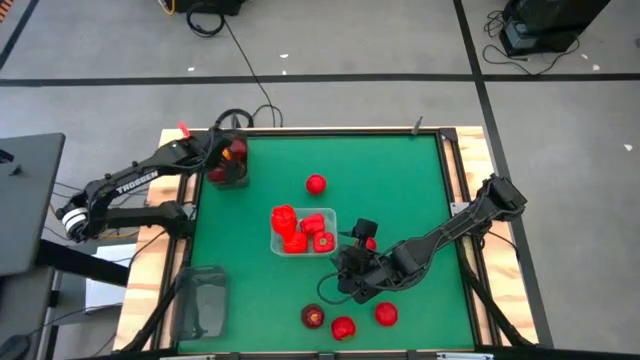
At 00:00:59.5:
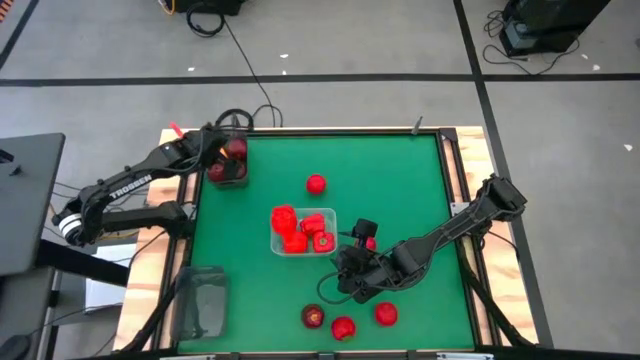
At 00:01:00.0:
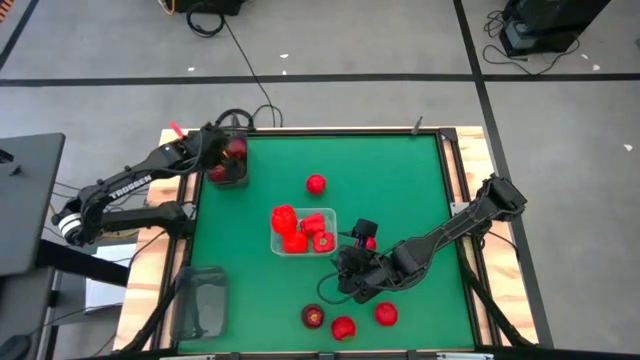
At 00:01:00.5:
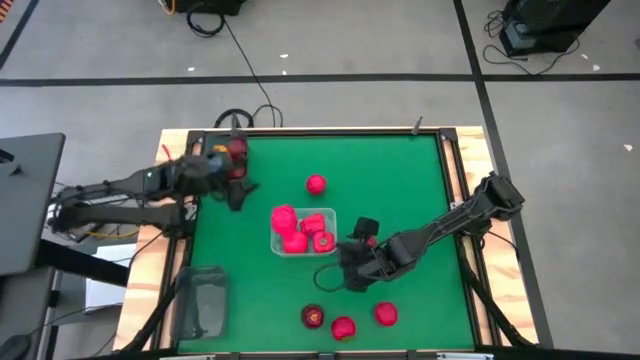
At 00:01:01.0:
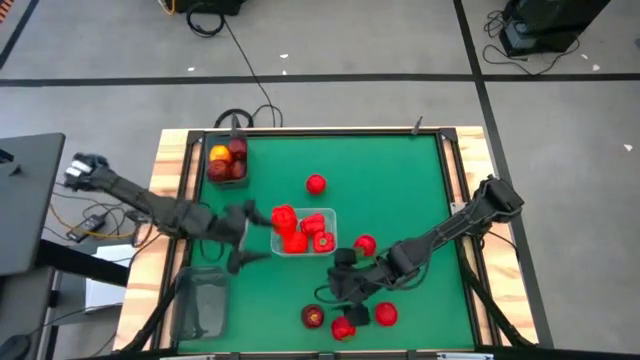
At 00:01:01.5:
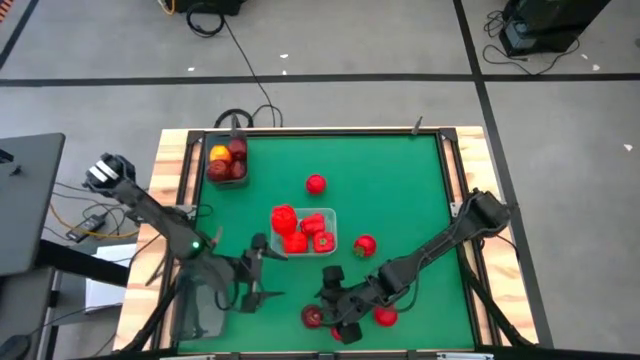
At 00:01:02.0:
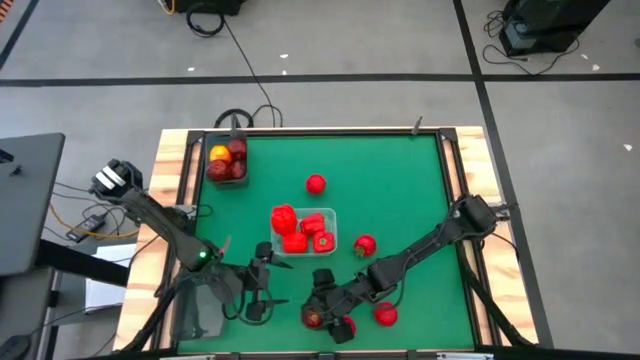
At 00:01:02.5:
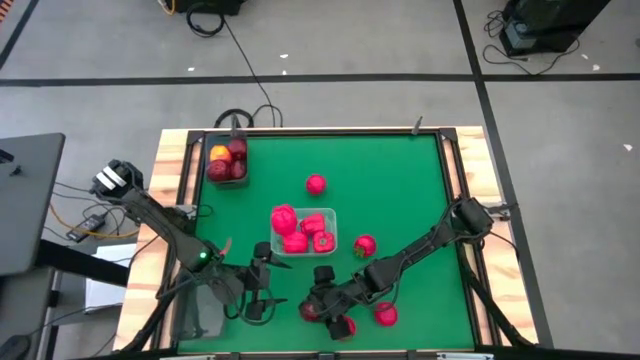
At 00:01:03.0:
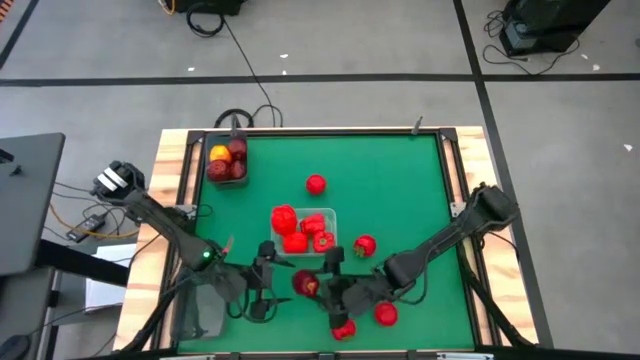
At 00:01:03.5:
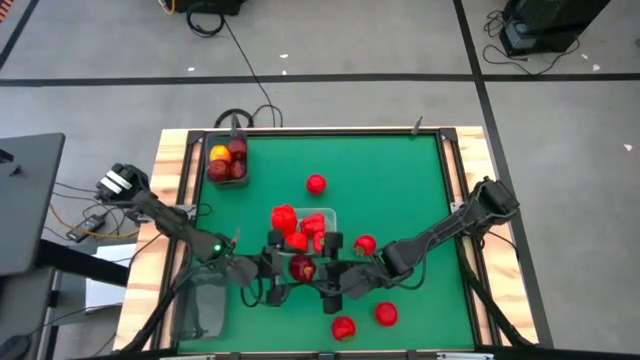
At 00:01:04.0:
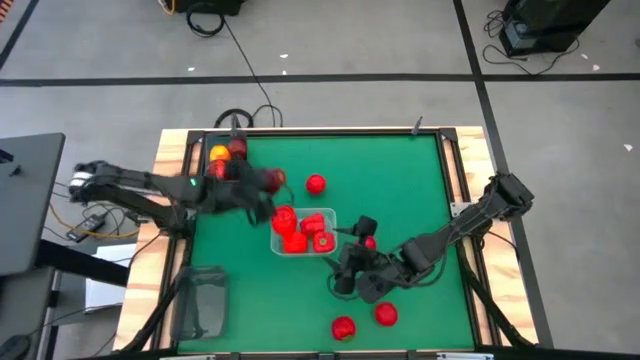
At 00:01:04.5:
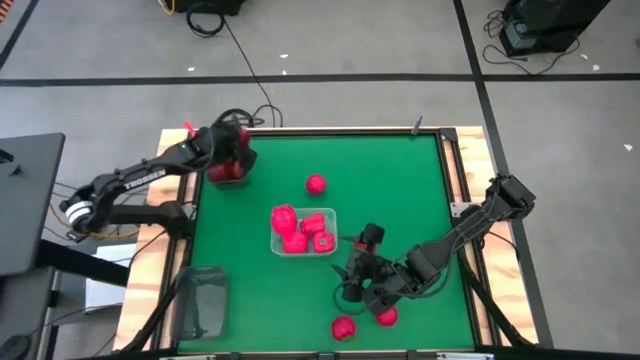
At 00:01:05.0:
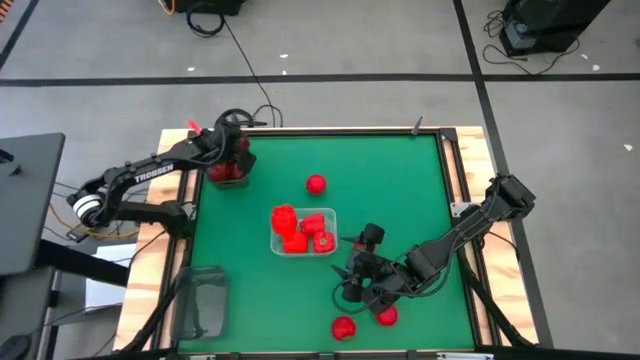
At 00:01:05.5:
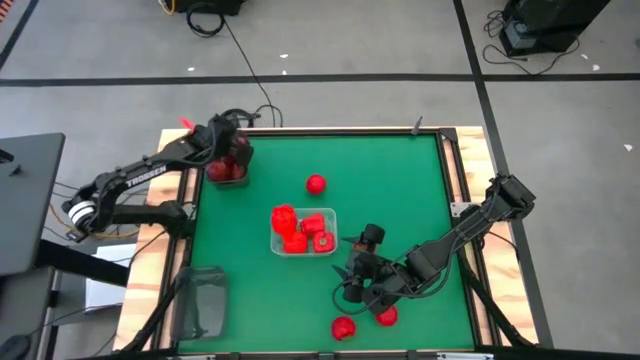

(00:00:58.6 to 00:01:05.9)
Task: Sort produce into baskets
Put the red apple into the top black bin

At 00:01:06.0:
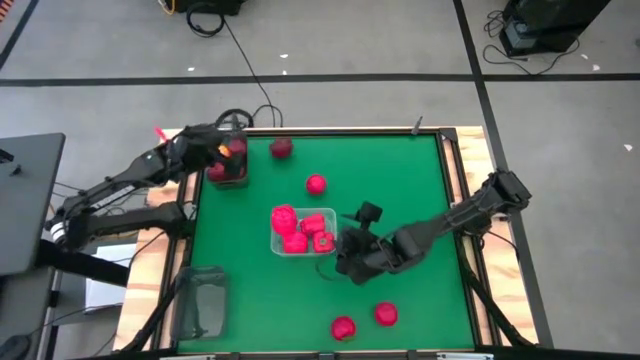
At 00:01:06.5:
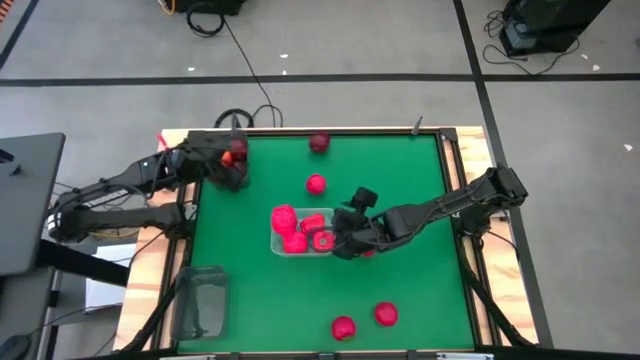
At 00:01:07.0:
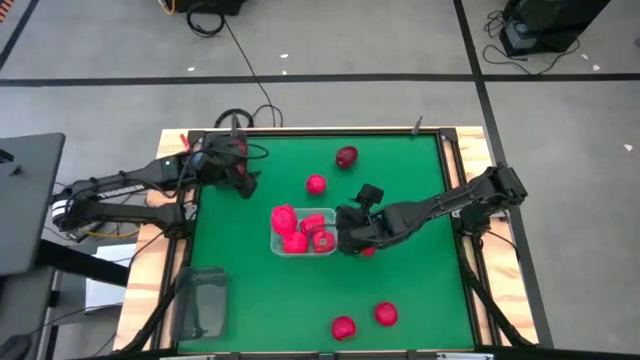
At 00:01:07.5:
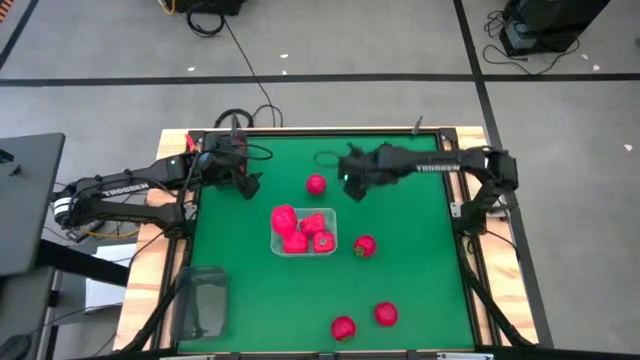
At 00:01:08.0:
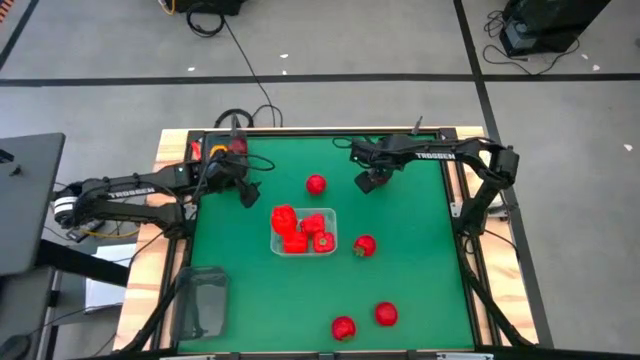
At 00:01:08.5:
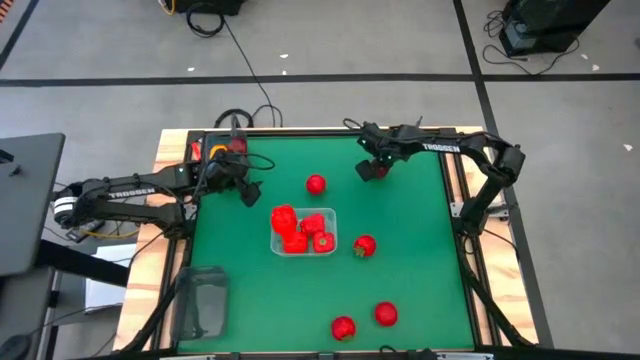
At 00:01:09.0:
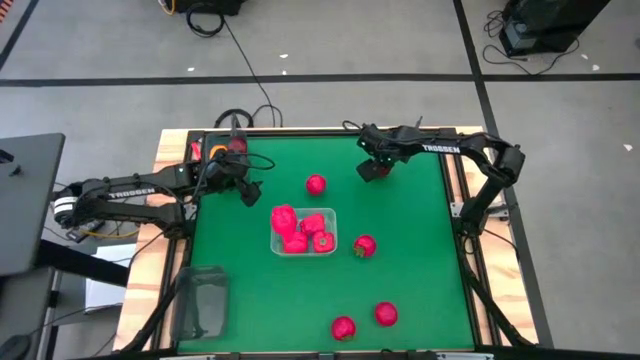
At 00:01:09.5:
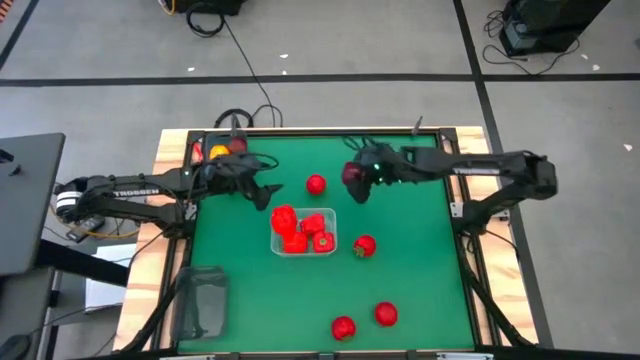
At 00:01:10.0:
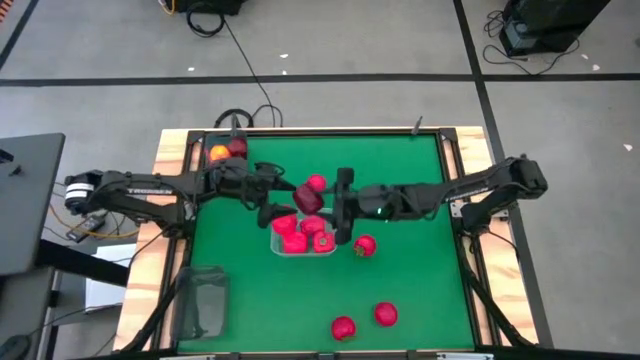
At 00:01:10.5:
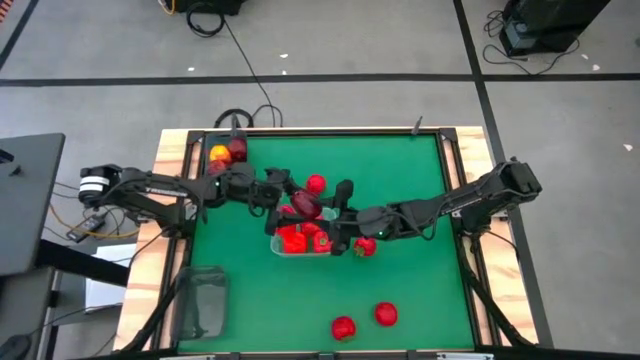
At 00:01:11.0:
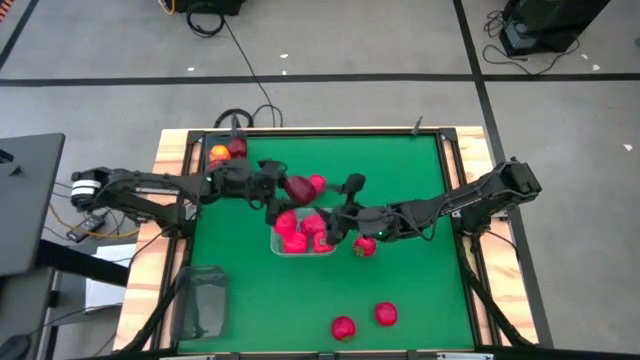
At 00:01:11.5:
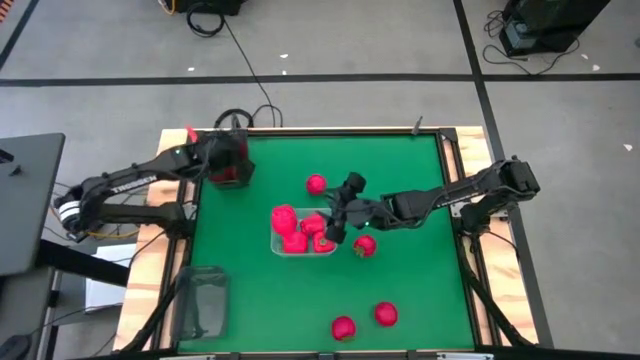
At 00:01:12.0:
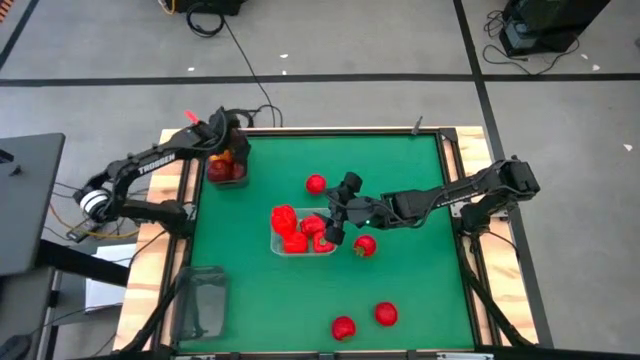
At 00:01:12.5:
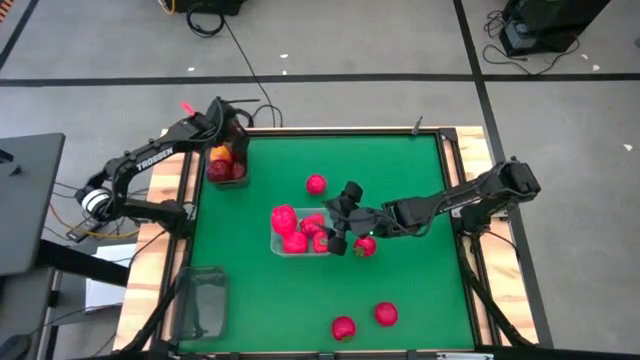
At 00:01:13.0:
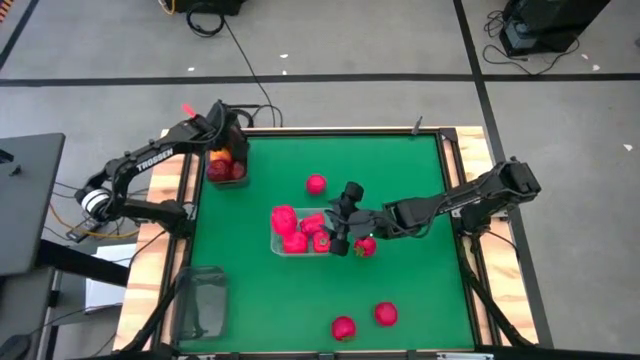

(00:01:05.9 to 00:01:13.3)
Put the red apple into the top black bin

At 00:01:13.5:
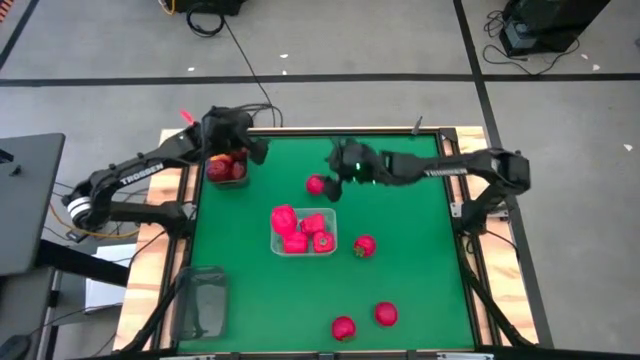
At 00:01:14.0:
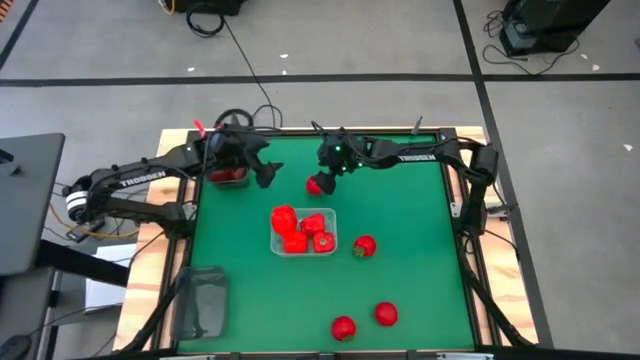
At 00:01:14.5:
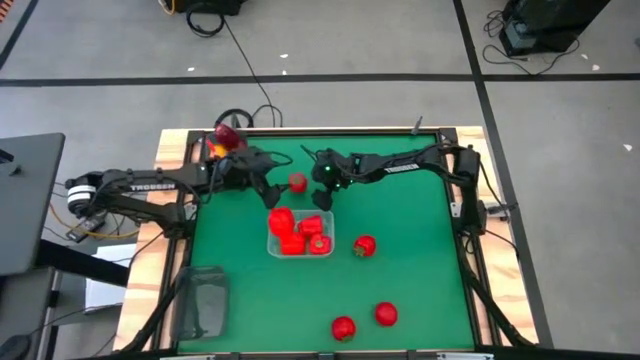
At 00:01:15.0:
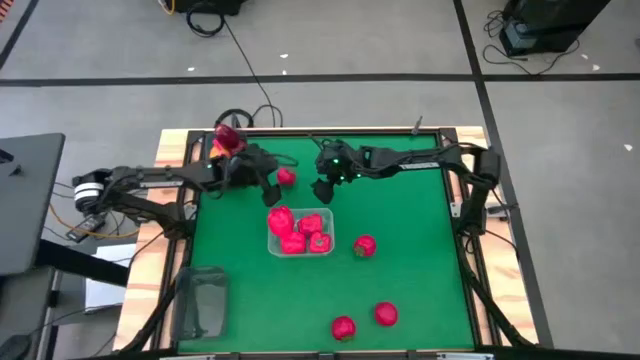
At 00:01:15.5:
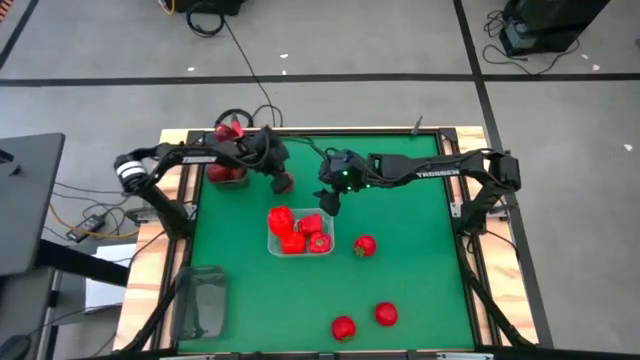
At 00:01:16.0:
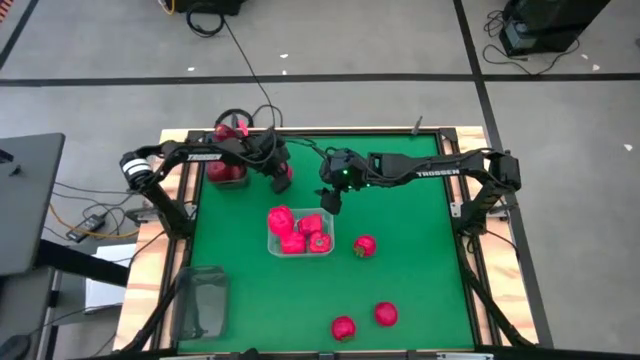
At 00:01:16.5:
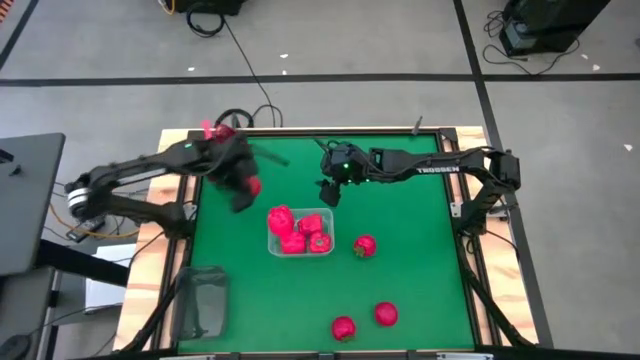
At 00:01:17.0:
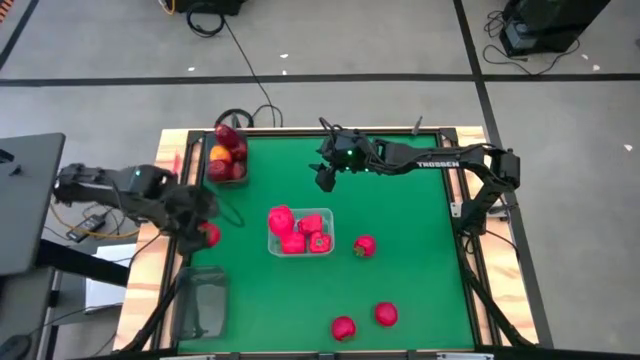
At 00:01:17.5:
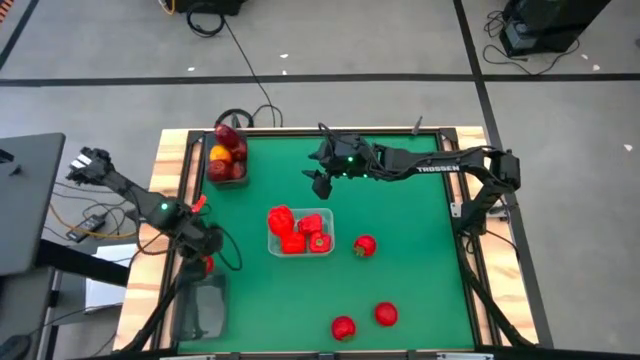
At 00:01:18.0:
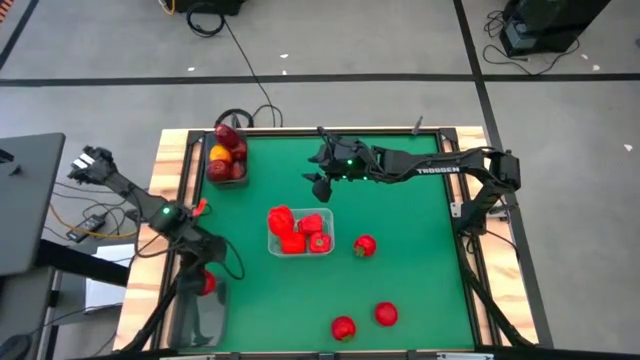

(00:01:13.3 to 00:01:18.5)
Put the red tomato into the bottom black bin

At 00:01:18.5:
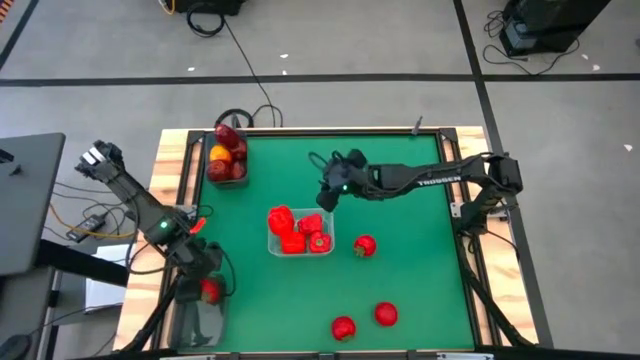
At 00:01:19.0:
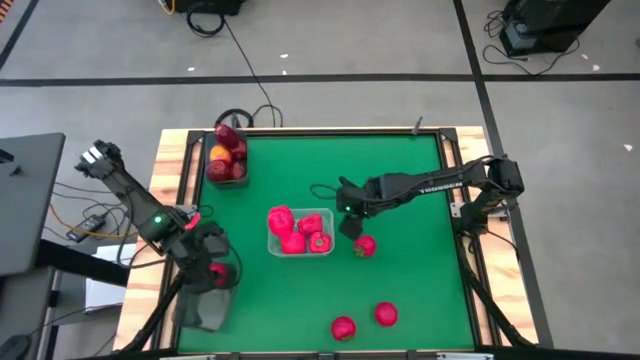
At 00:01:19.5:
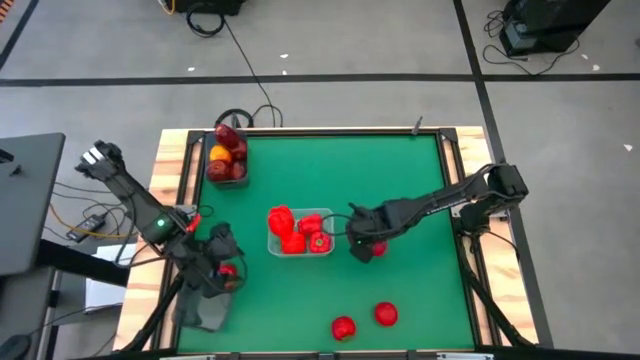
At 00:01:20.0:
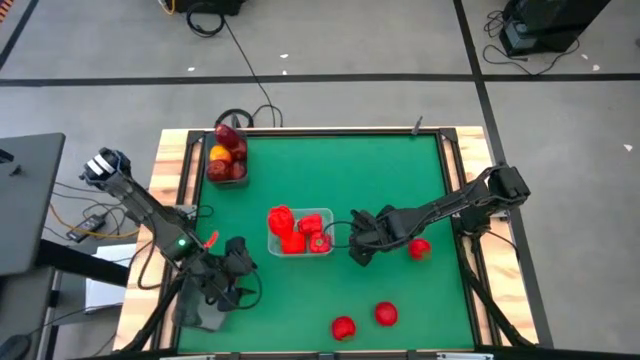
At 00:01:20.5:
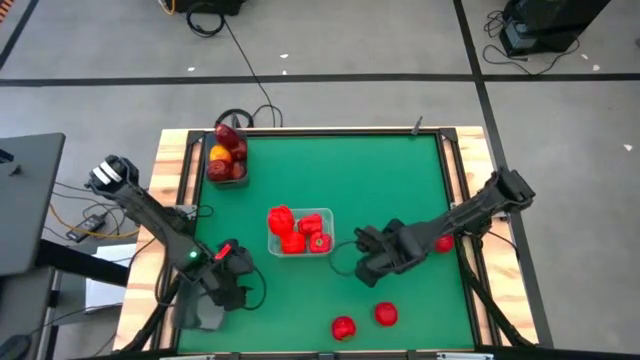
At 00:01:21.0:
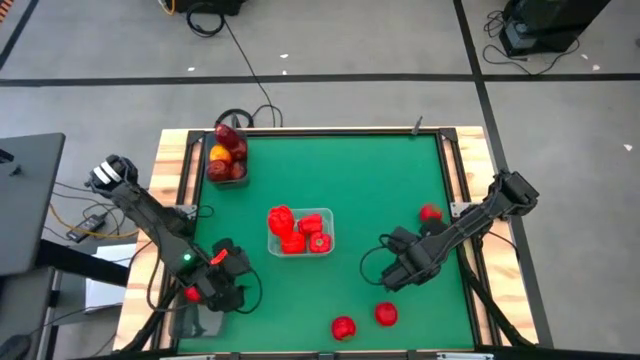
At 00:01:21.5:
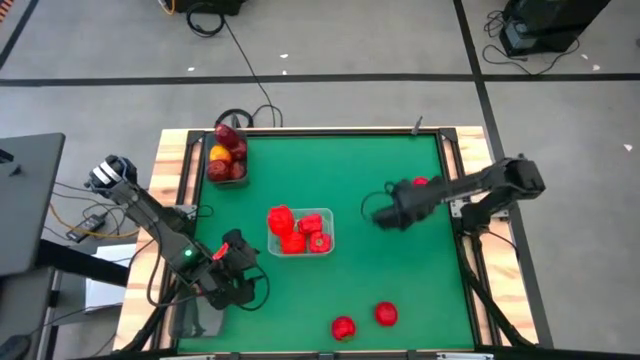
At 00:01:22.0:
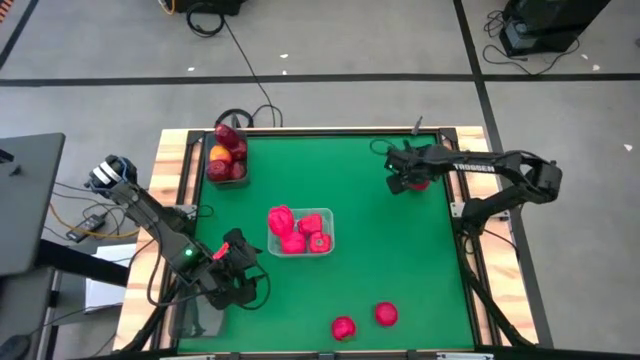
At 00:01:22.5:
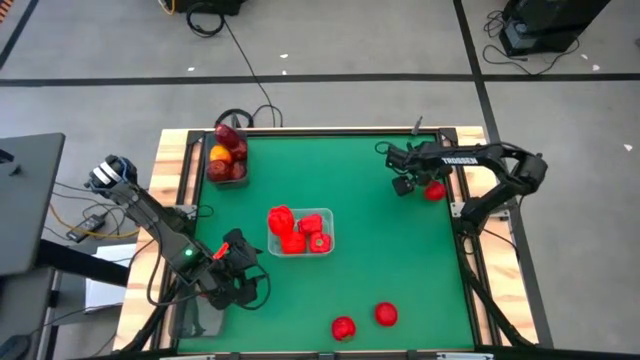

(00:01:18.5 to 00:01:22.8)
Put the red tomato into the bottom black bin
